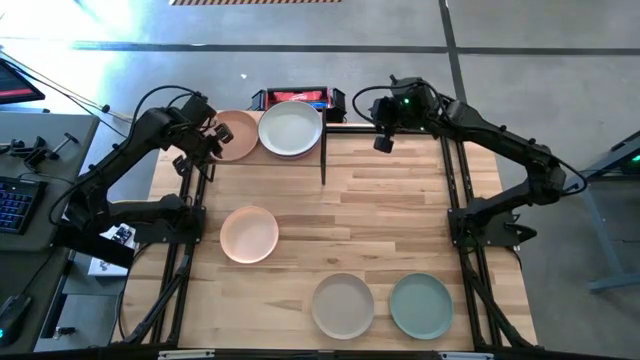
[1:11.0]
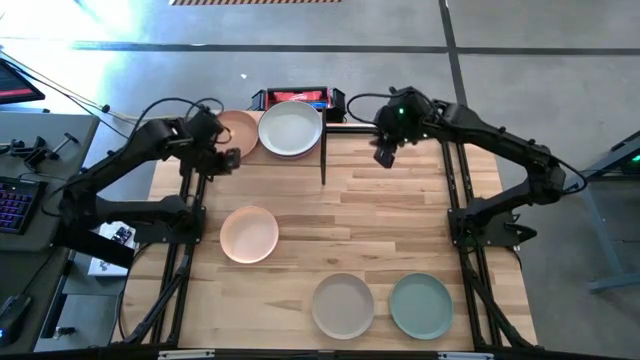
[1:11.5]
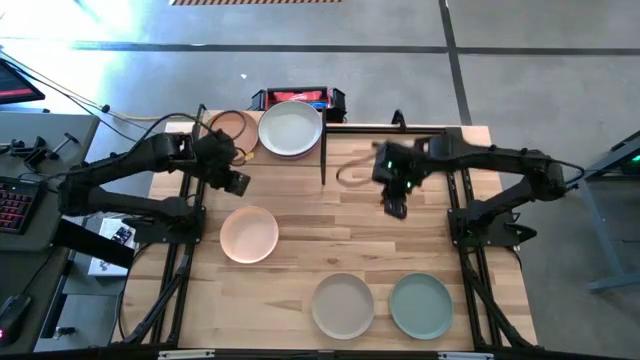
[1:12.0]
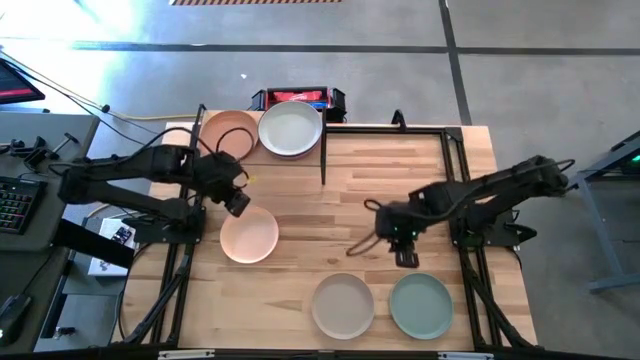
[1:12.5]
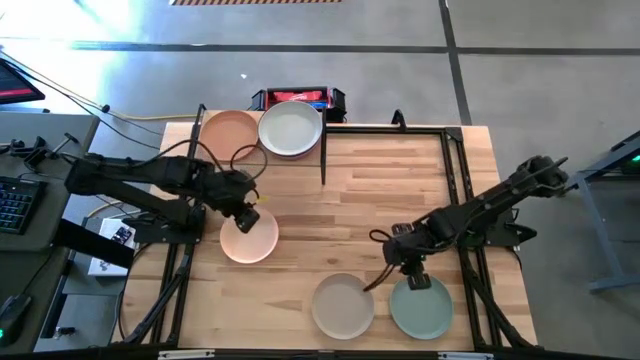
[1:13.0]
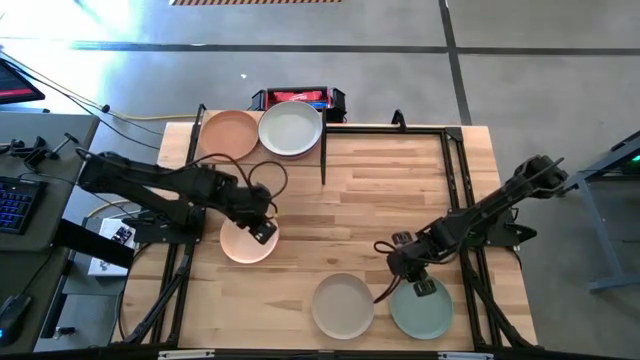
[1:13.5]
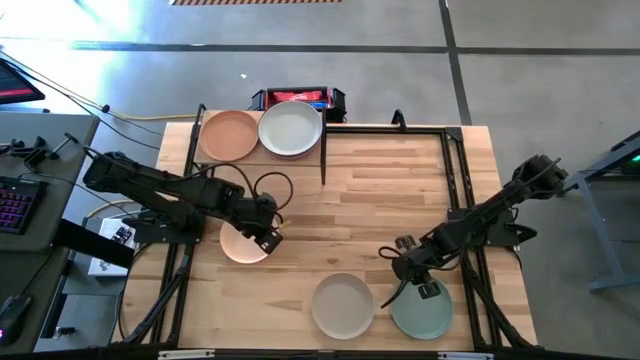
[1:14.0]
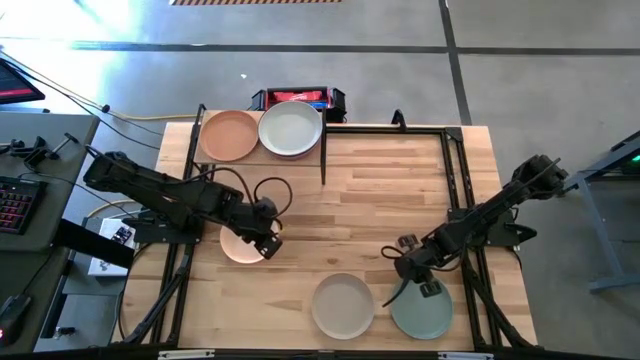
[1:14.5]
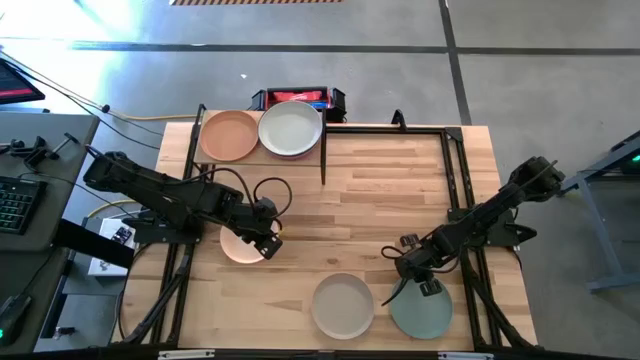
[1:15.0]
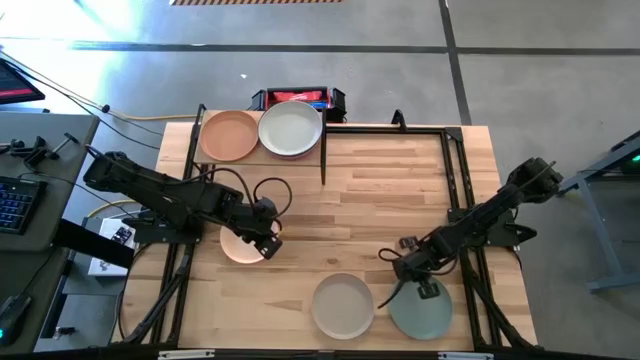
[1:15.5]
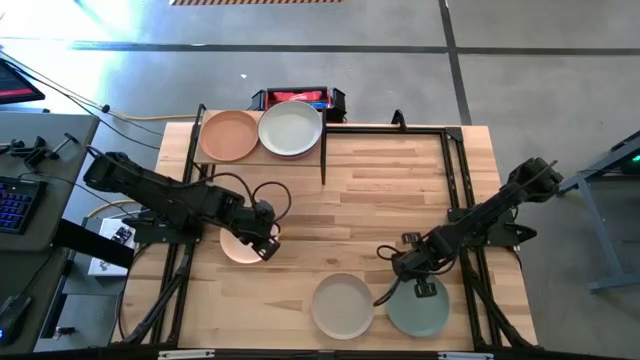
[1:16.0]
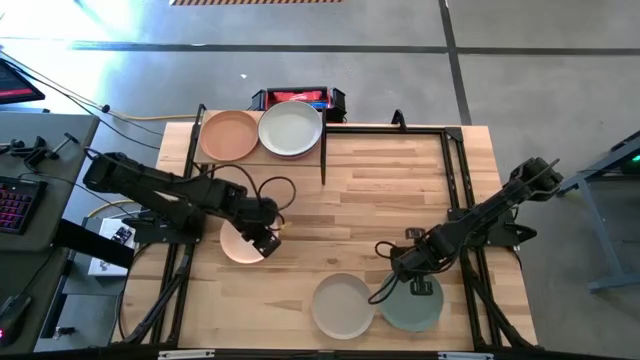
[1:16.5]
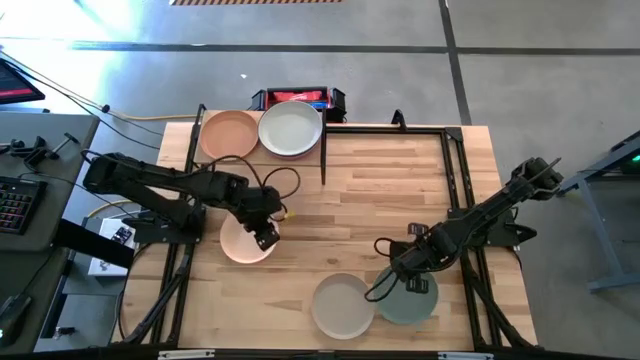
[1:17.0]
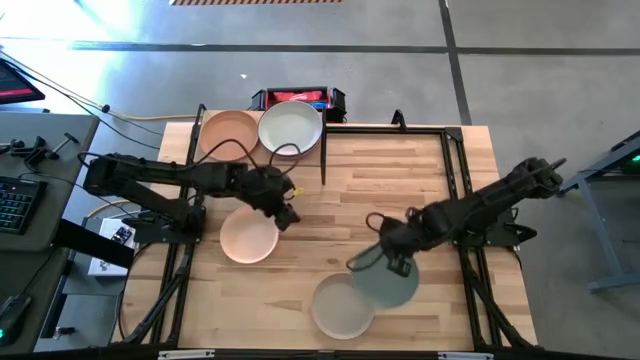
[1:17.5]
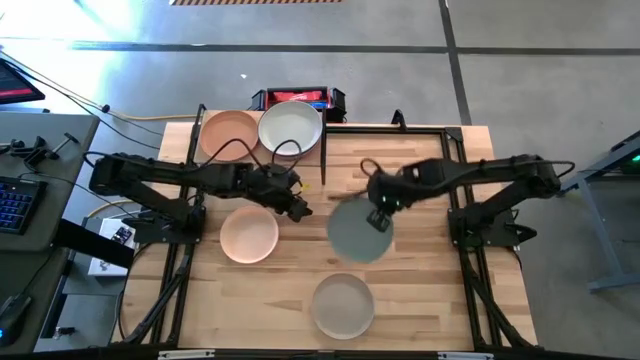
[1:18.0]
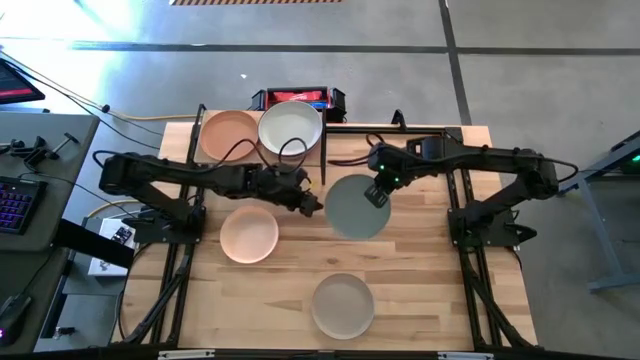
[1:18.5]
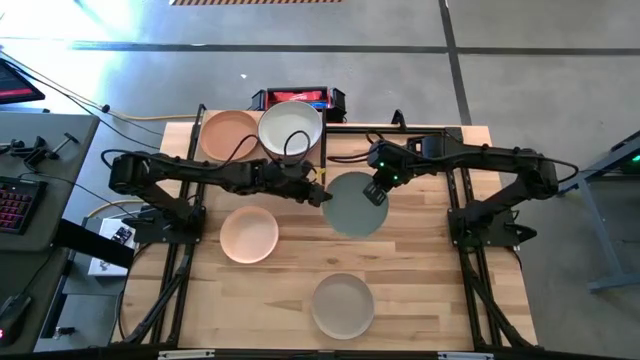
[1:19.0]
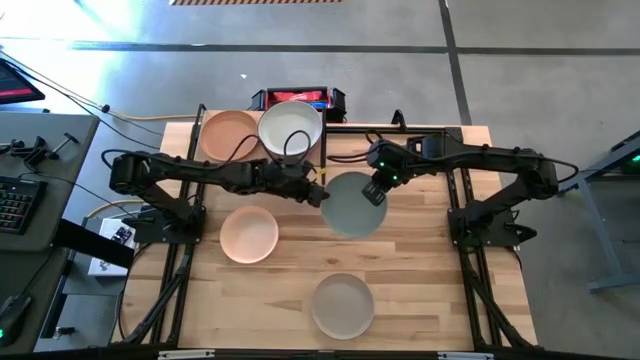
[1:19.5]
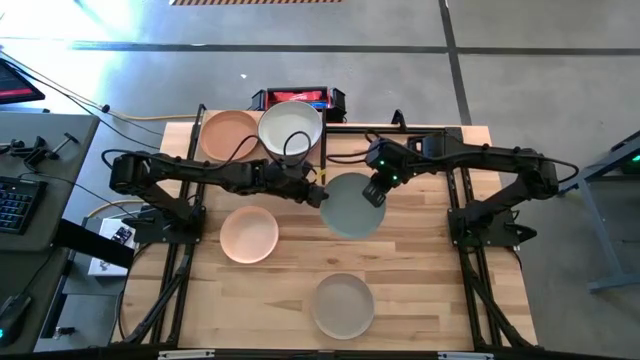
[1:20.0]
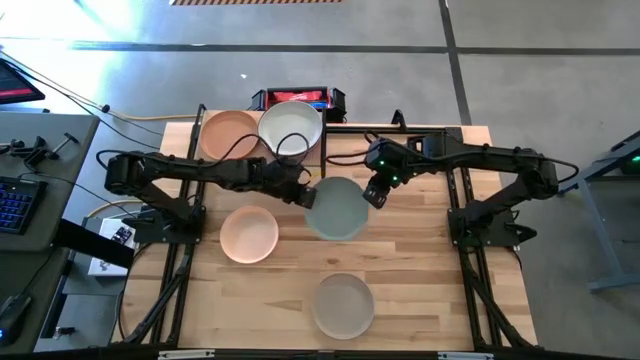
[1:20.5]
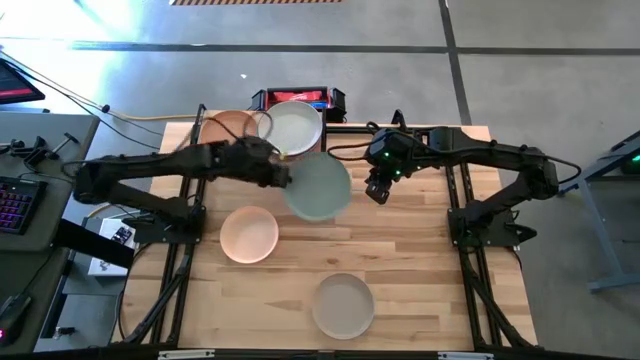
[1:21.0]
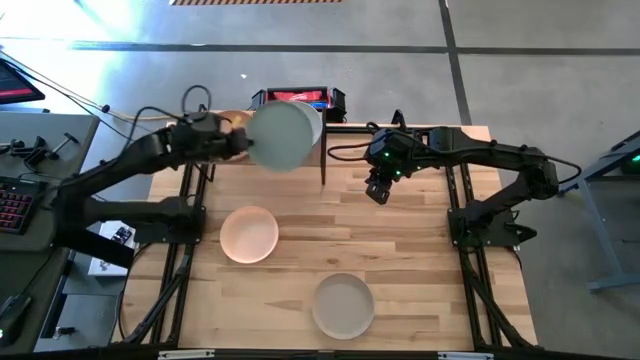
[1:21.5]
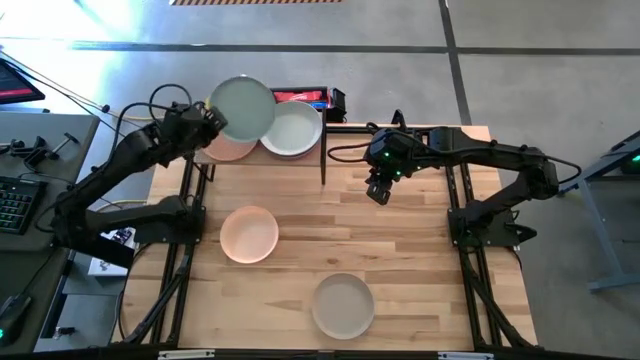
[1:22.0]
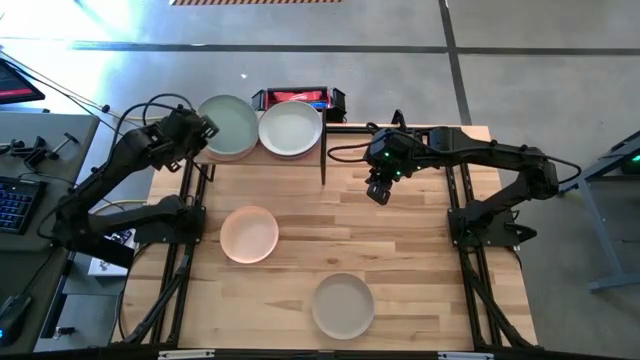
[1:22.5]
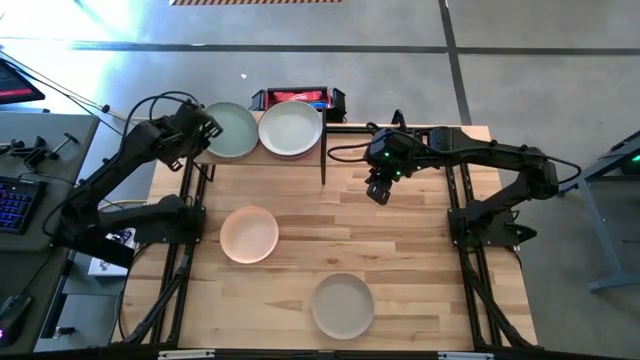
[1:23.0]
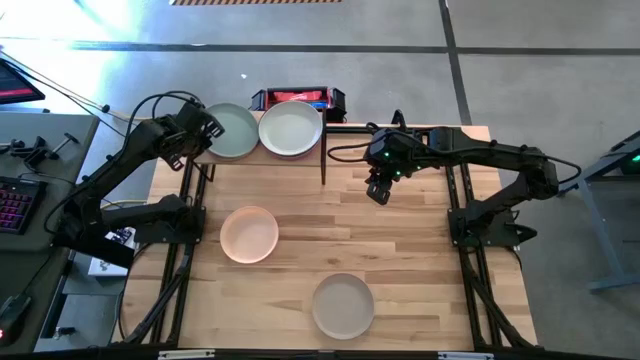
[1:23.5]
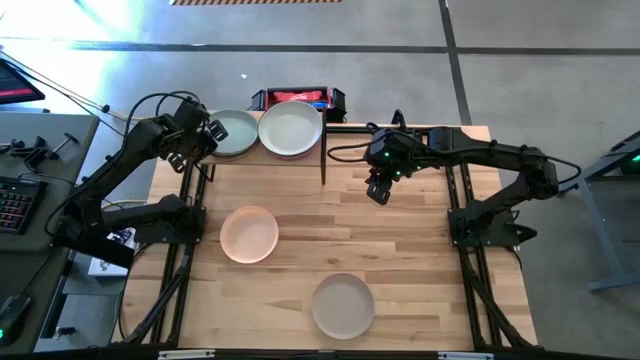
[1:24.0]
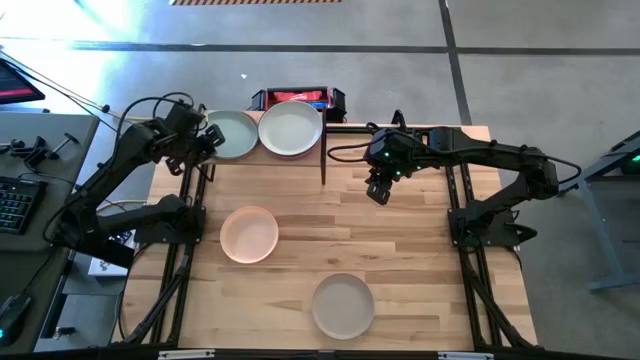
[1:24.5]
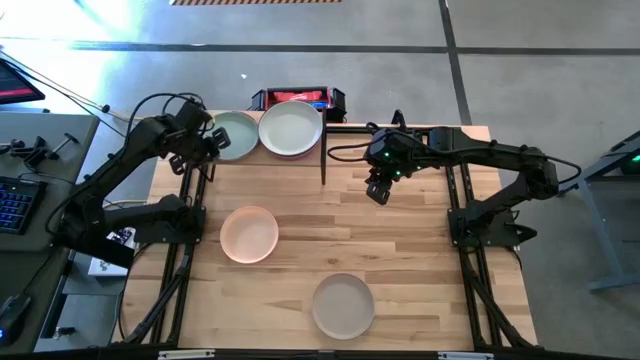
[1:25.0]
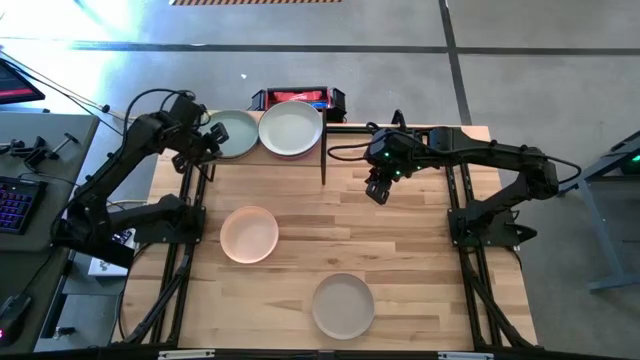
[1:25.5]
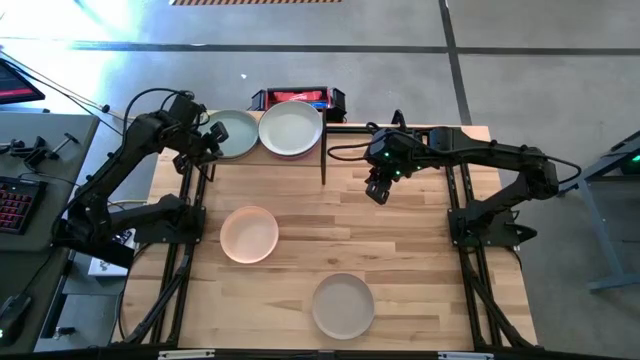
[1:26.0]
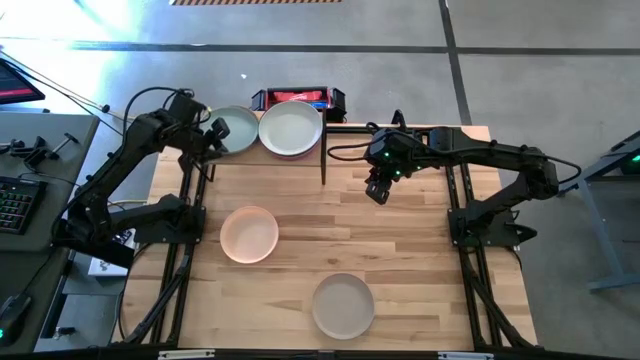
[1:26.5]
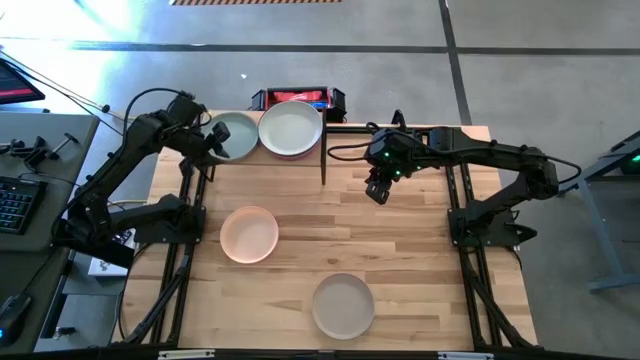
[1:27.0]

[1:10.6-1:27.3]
Task: Place and stack plates onto a shelf
Stack the light blue plate on top of the orange plate on the shelf

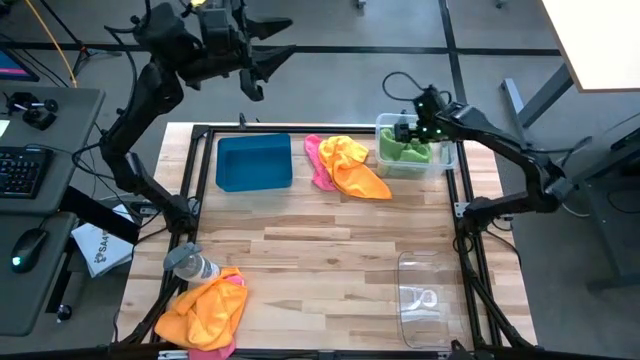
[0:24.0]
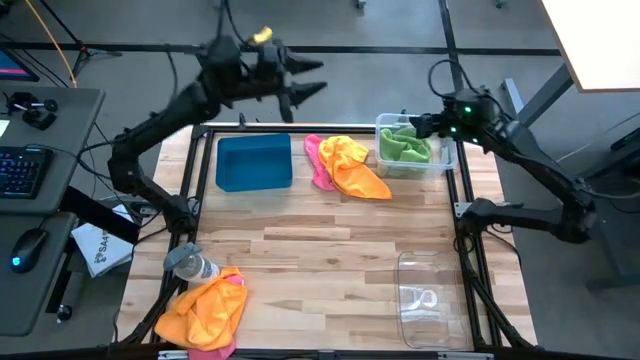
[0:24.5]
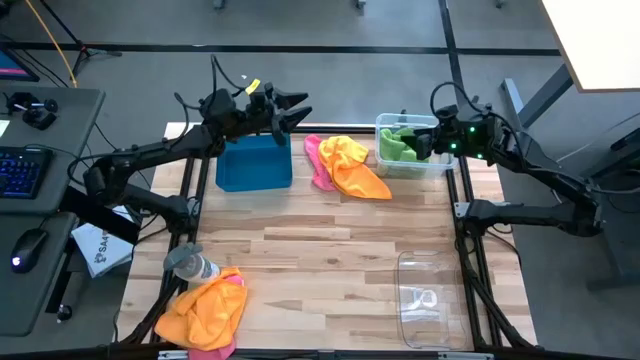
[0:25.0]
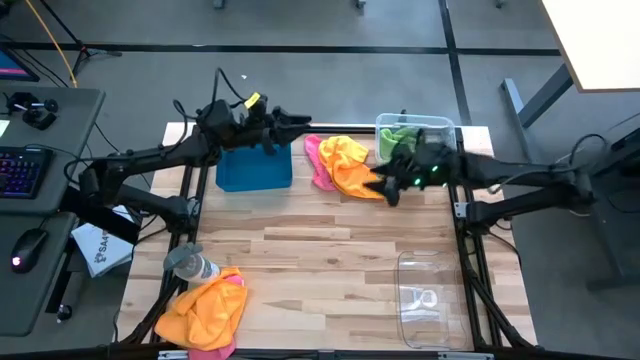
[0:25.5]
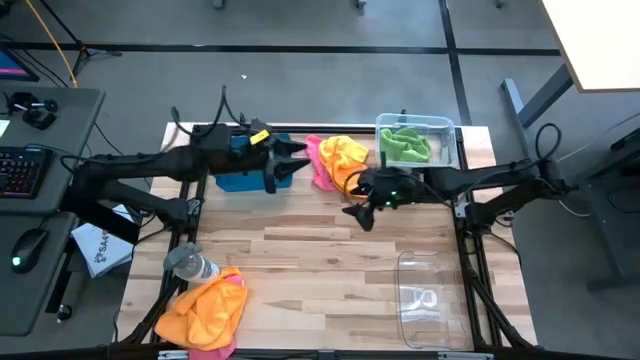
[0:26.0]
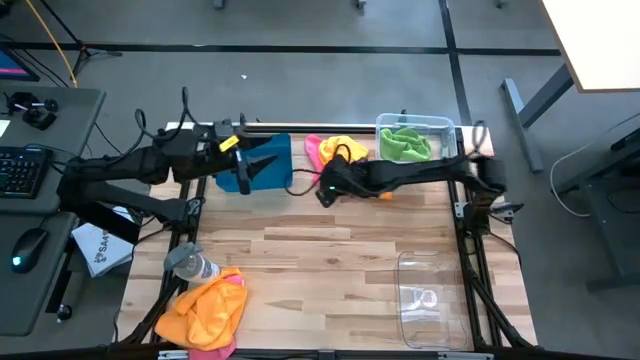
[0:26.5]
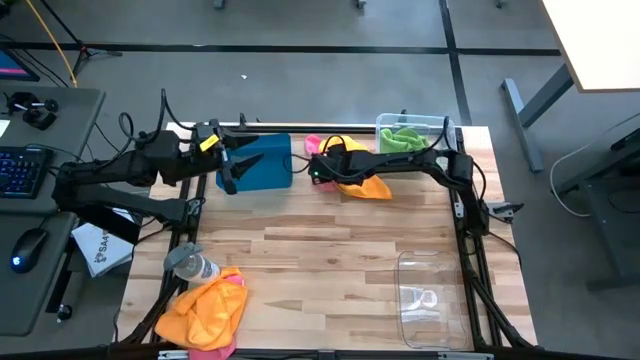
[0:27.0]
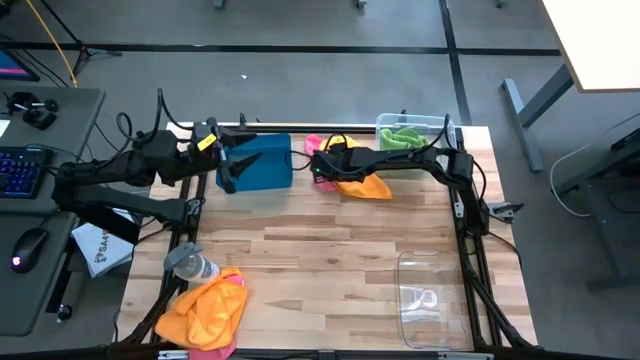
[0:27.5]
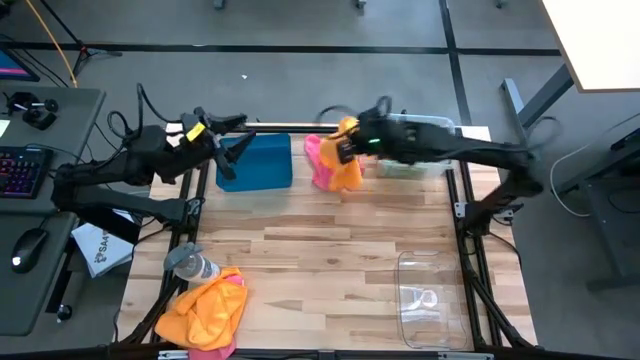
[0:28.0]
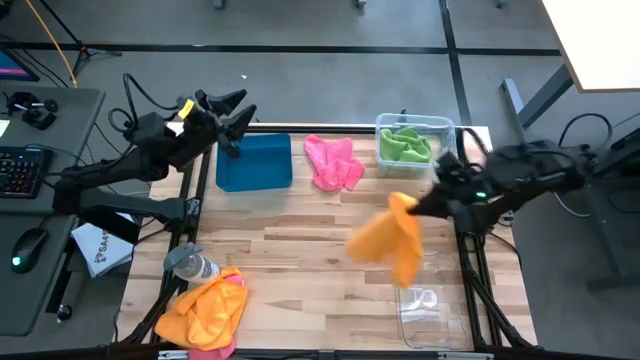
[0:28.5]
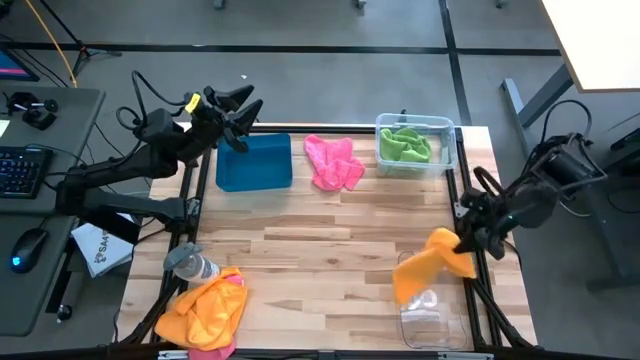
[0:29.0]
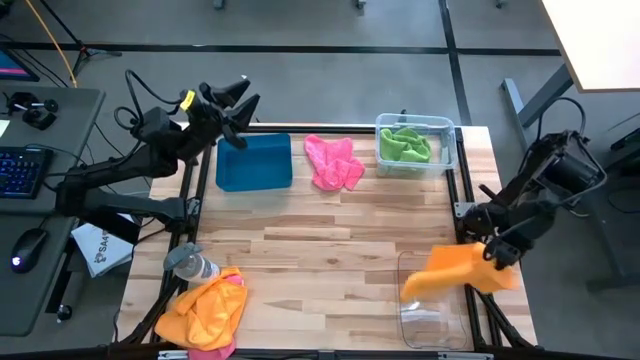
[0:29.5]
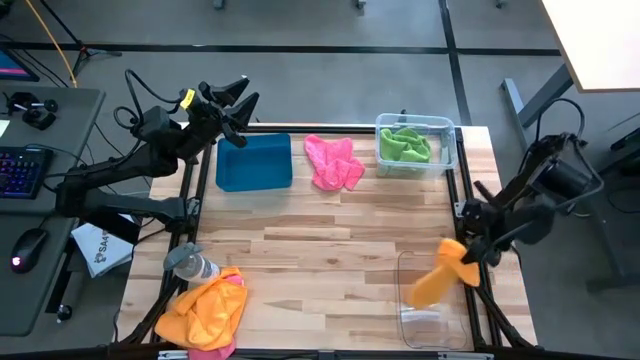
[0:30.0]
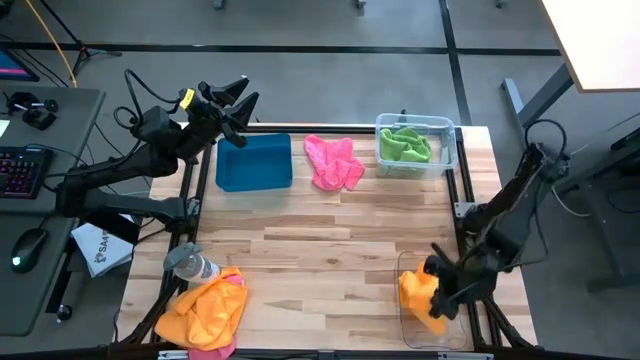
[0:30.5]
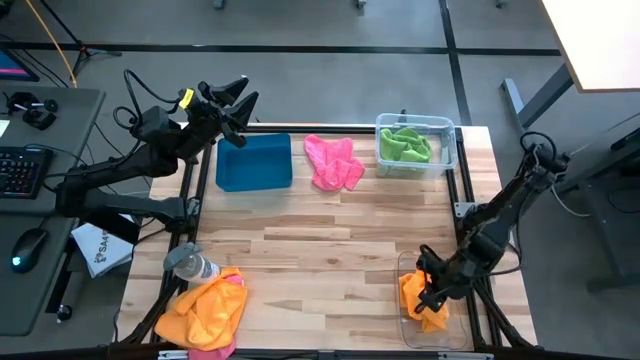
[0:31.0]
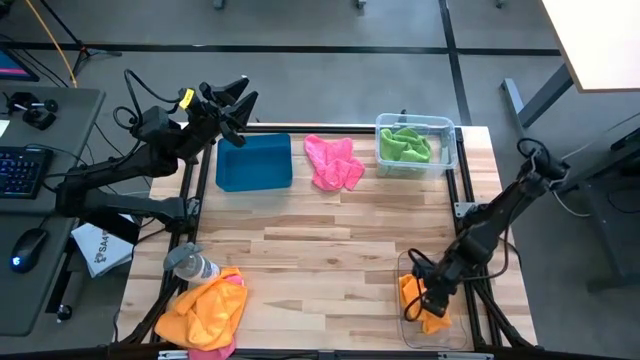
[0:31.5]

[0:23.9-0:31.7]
Task: Sort microfiber towel by color & place in baskets
Put the top orange towel into the bottom transparent bin
